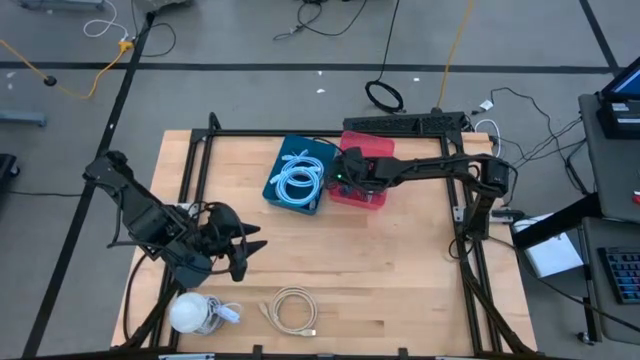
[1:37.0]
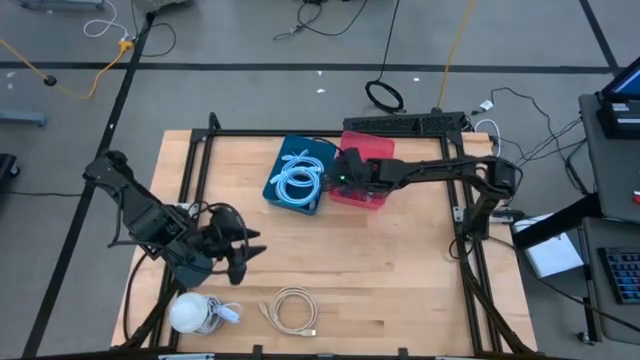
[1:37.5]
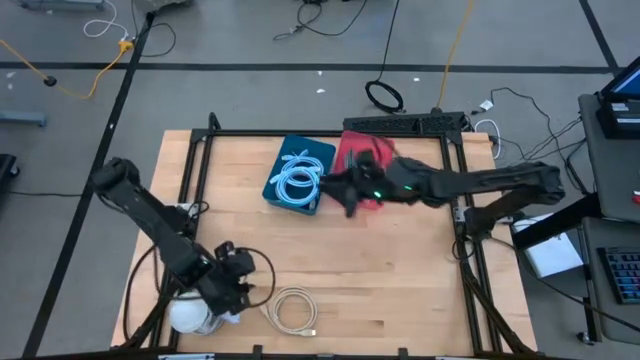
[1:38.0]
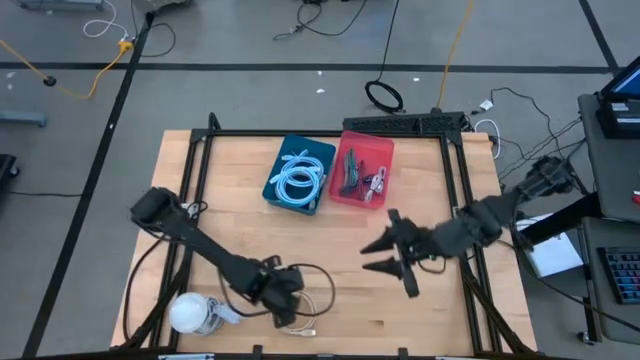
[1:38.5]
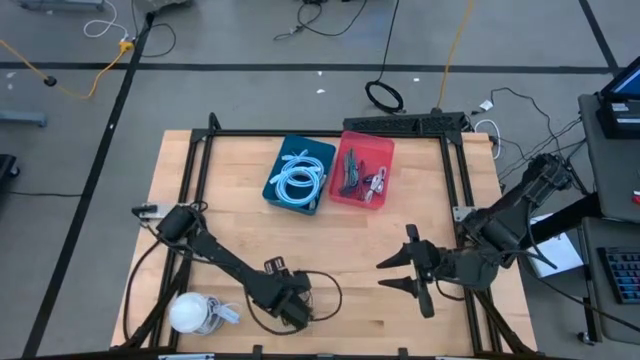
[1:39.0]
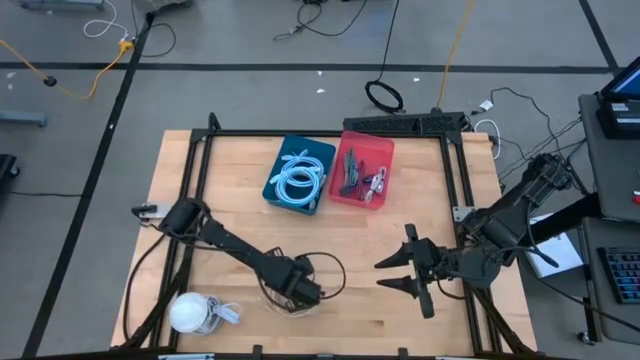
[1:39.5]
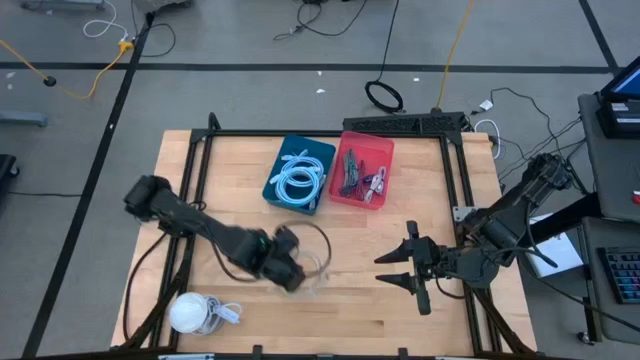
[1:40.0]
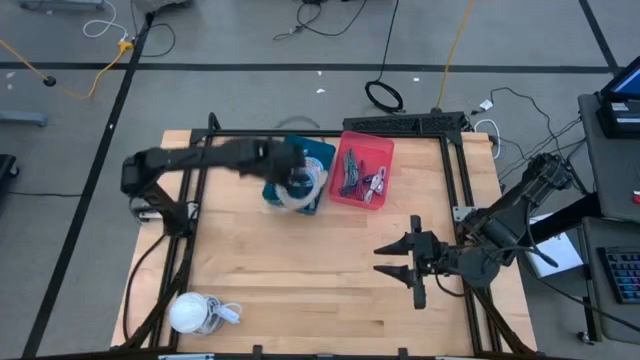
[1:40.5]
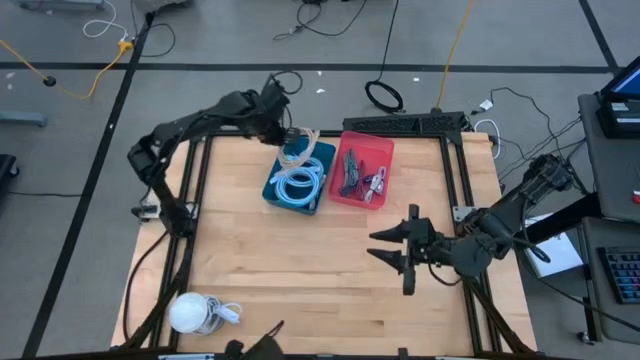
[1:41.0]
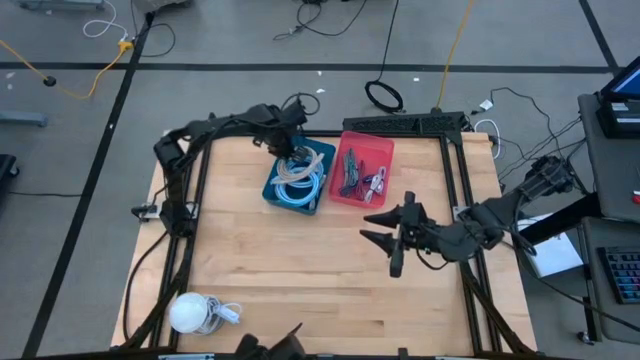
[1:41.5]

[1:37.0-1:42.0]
Task: Pick & Place USB Port
Put the large brown charger cable into the blue bin

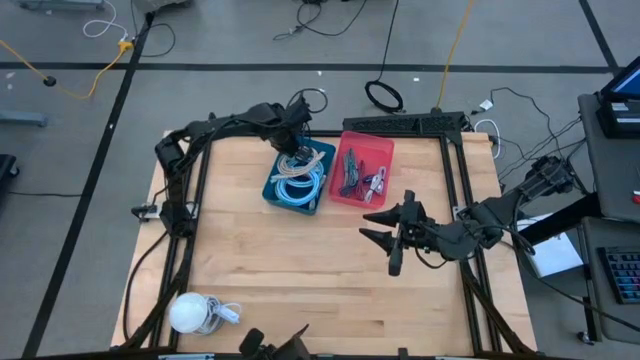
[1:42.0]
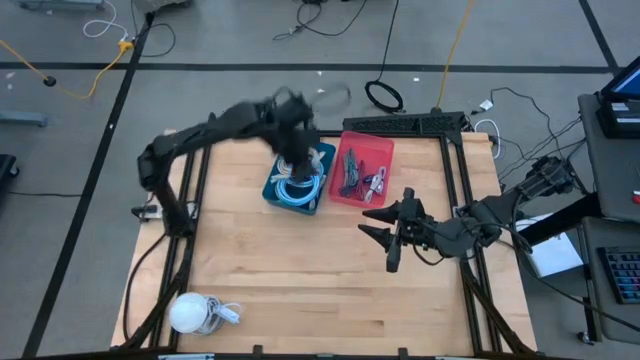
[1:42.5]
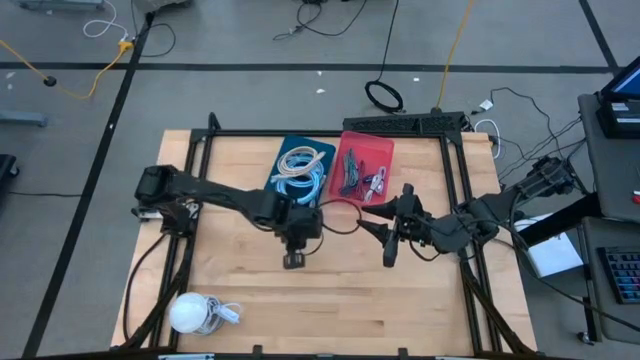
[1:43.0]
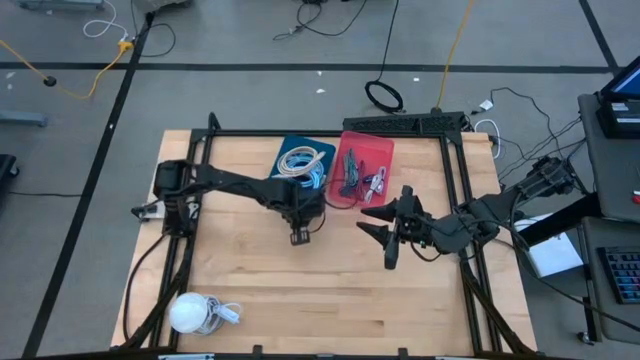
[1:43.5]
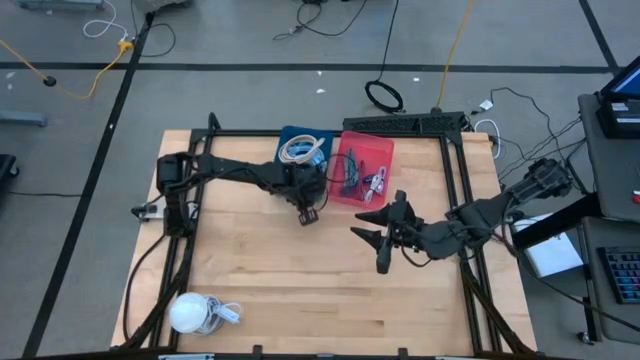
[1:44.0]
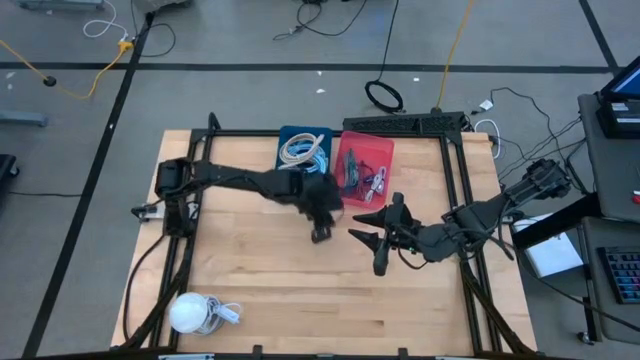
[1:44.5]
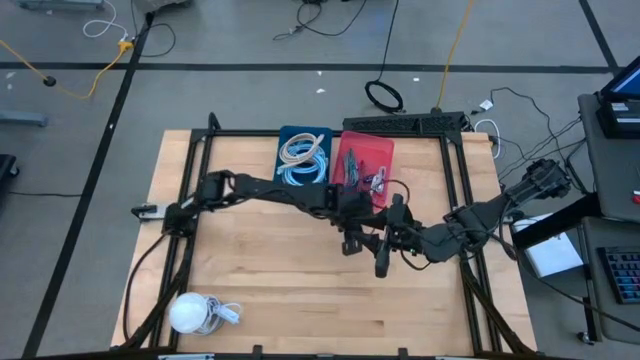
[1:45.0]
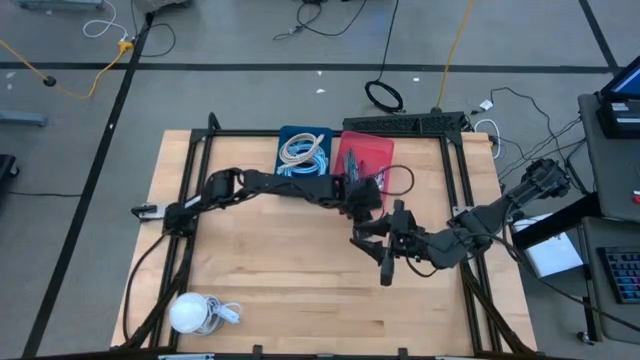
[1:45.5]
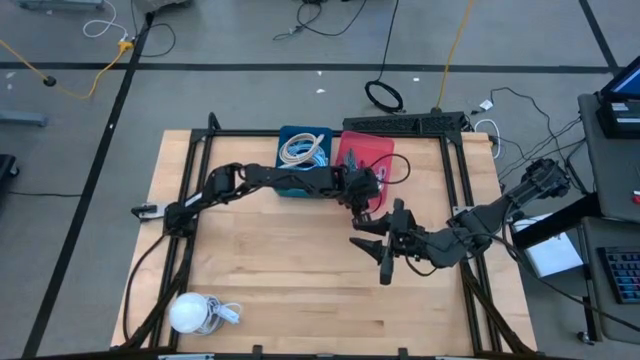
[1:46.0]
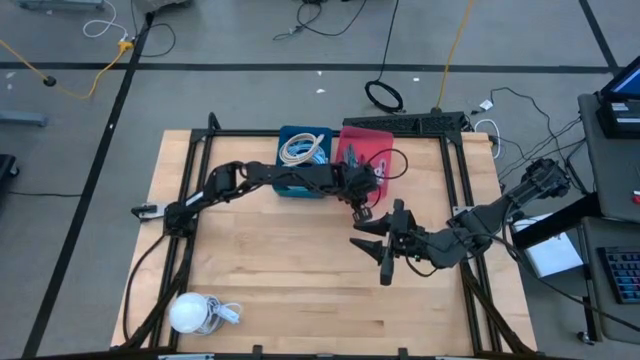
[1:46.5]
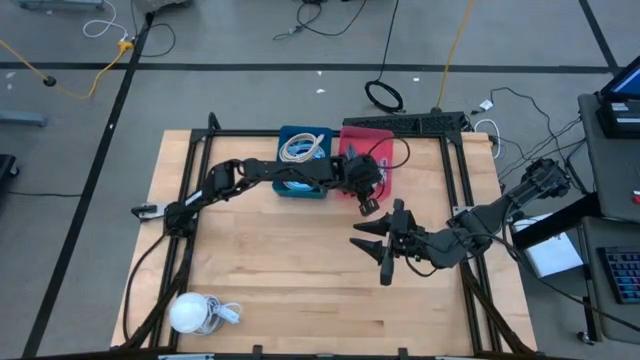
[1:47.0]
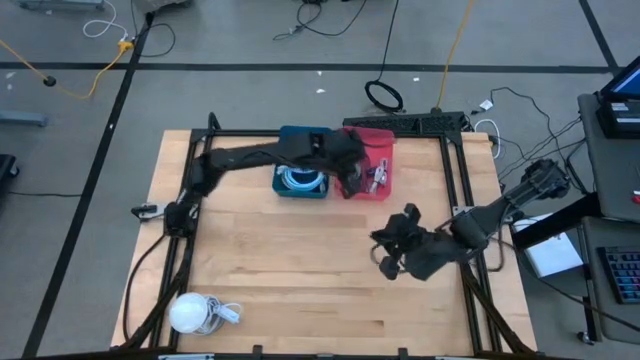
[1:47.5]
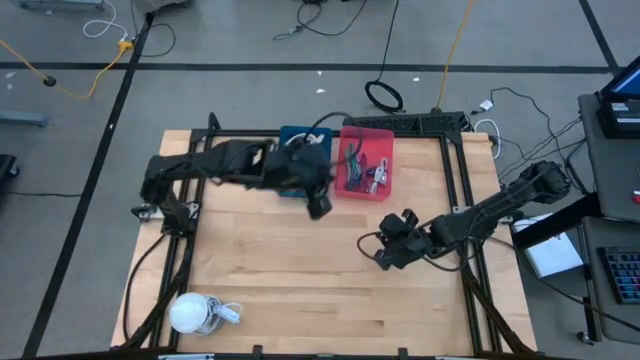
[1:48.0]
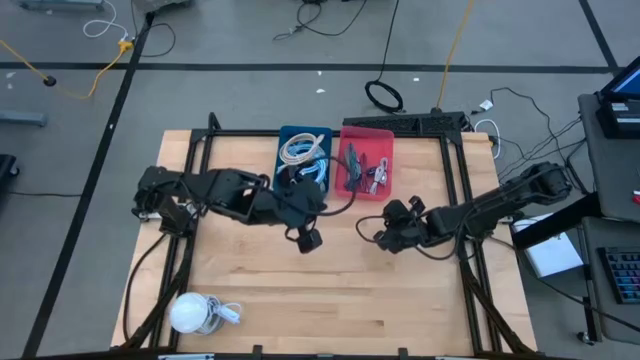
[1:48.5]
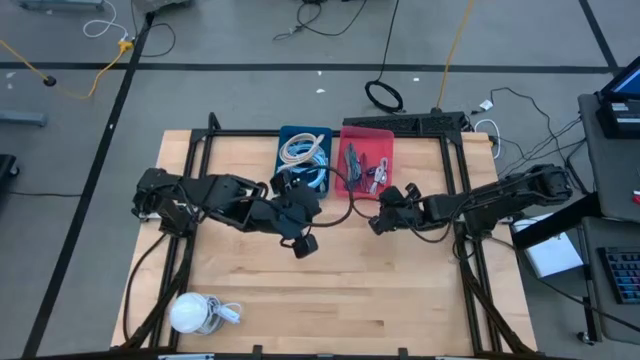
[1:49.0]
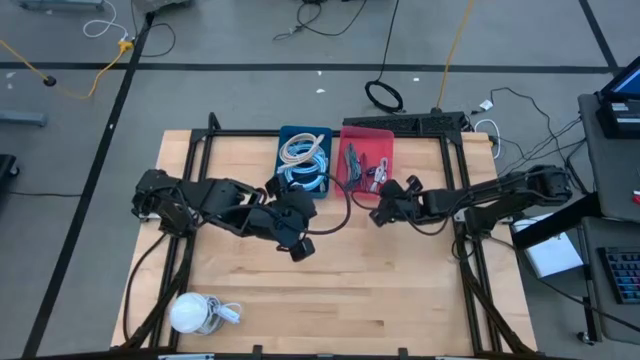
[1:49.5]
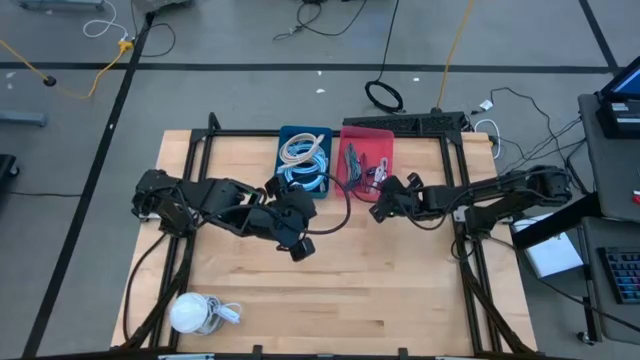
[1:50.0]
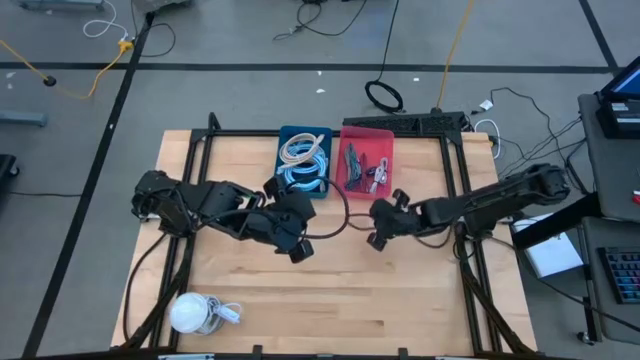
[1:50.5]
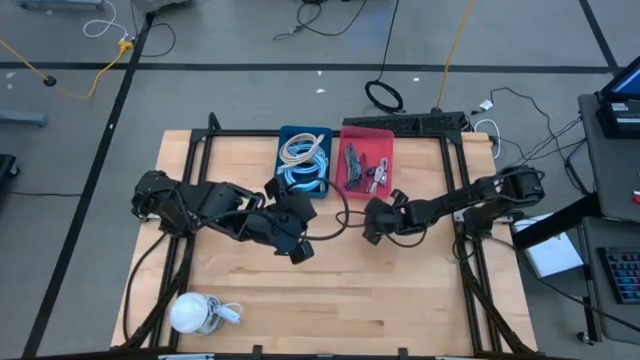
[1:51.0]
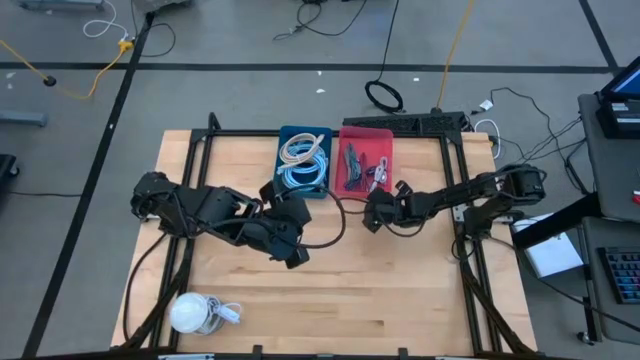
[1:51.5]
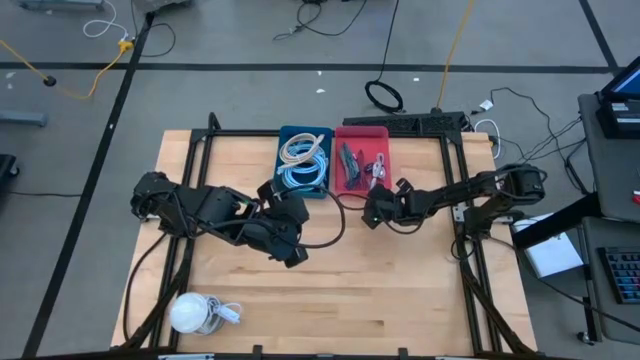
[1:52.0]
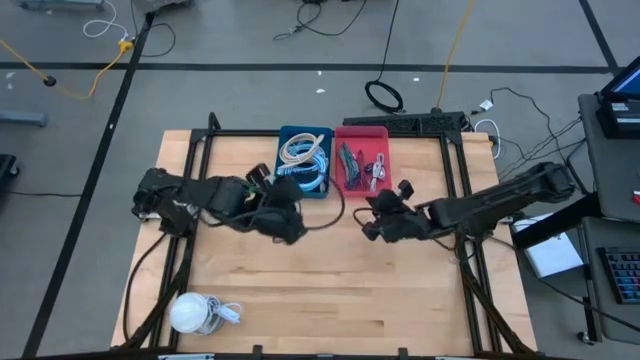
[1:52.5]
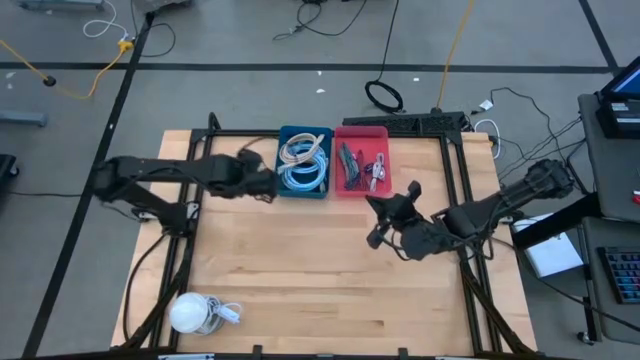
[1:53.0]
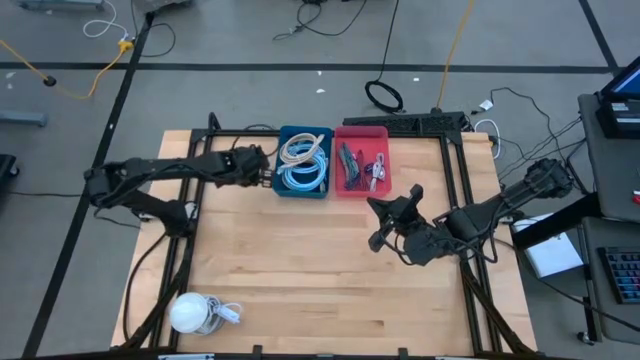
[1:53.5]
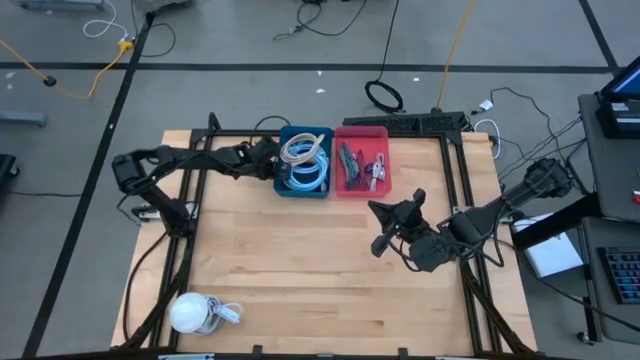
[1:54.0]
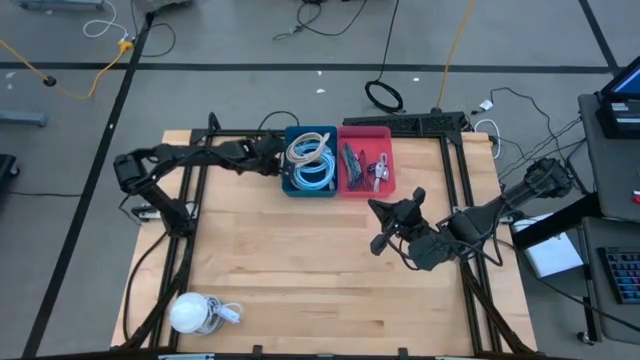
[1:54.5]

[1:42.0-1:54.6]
Adjust the bins

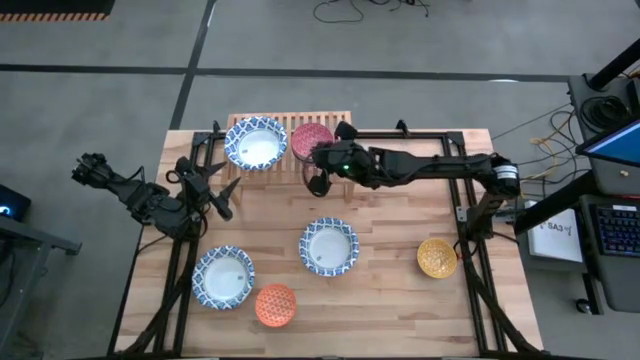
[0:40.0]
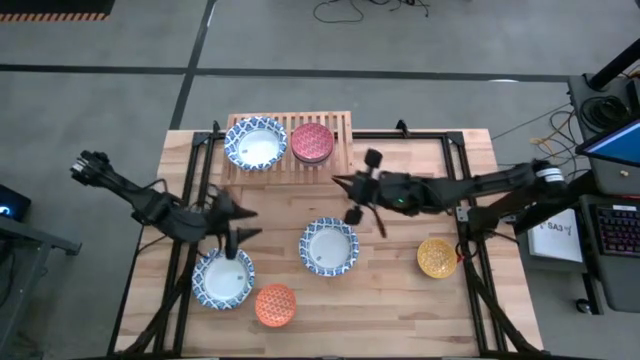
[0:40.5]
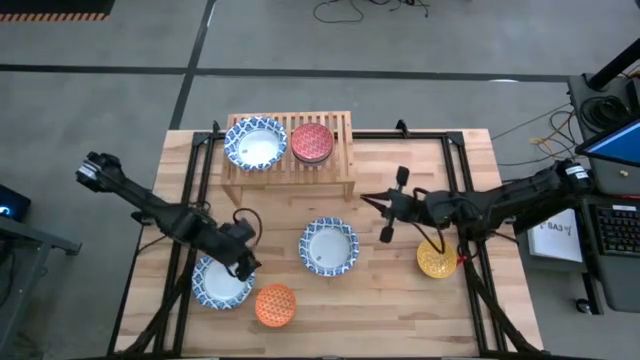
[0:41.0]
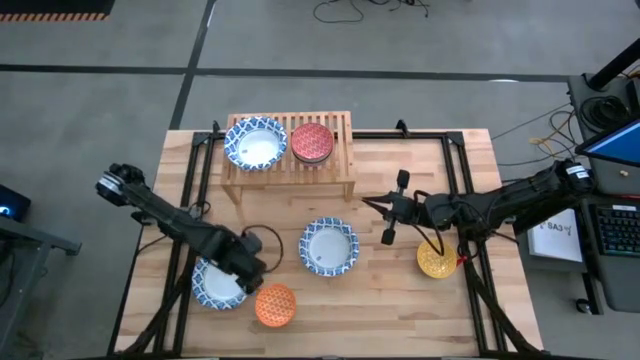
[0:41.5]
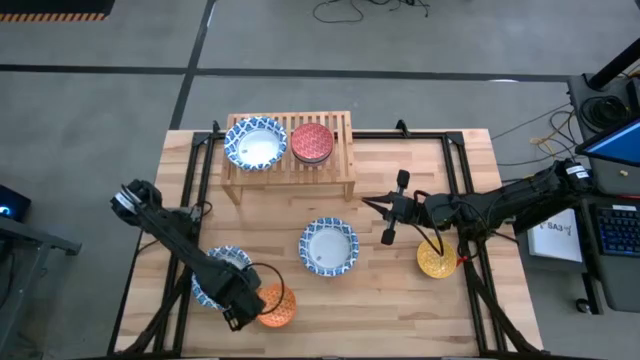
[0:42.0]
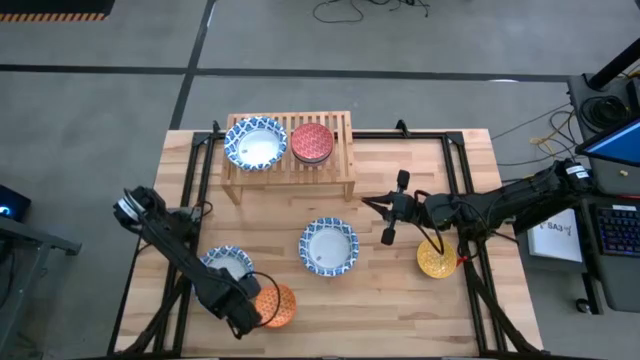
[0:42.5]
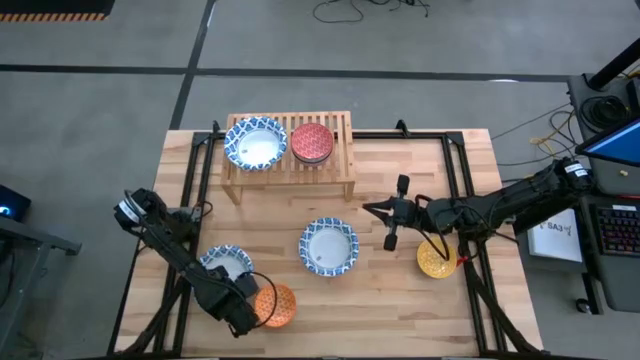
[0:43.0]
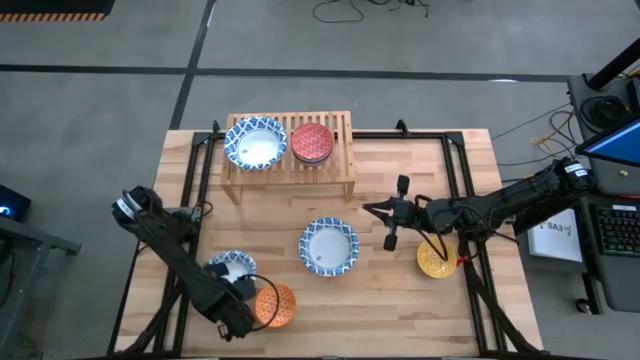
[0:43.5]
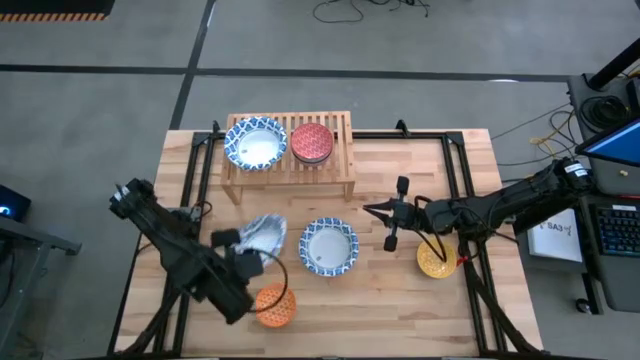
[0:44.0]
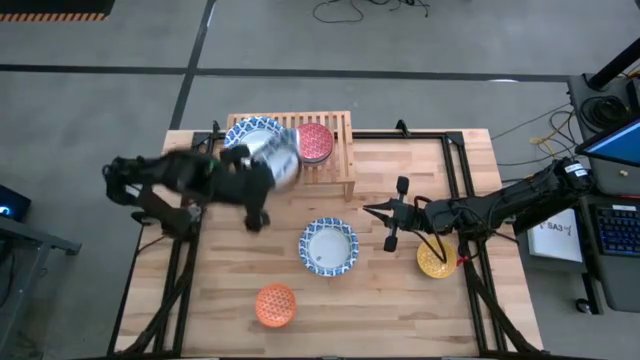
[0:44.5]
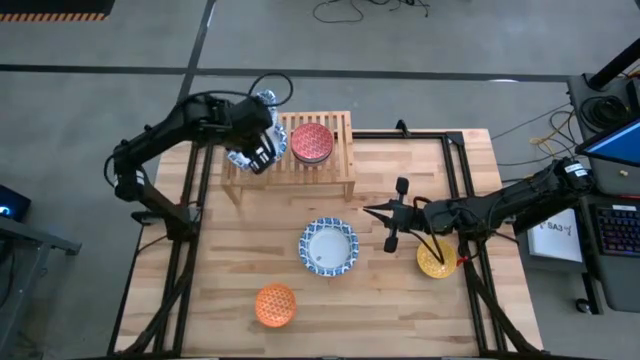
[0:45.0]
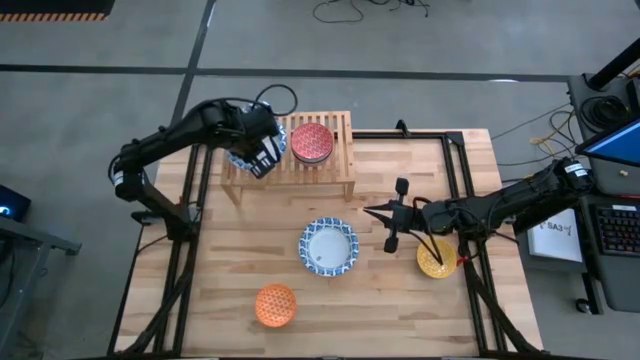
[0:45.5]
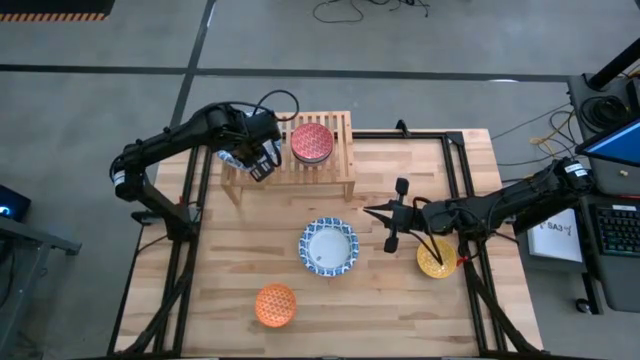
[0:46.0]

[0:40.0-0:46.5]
Task: Place and stack bowls onto a shelf
Stack the white pattern bowl on top of the other white pattern bowl on the shelf
